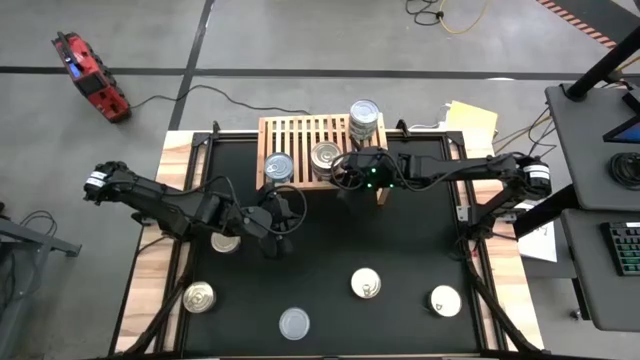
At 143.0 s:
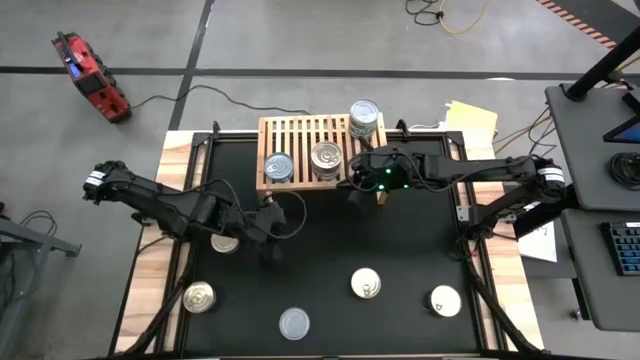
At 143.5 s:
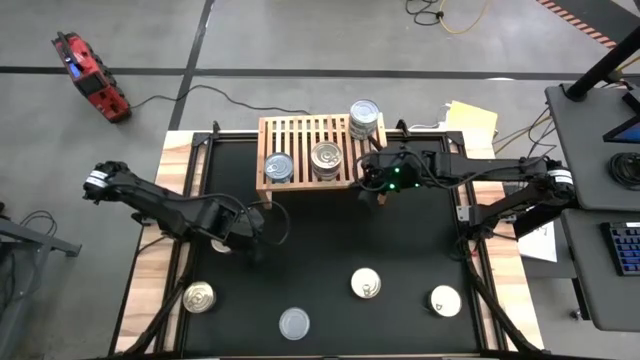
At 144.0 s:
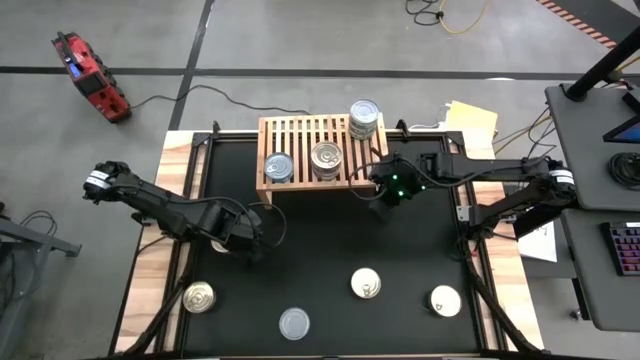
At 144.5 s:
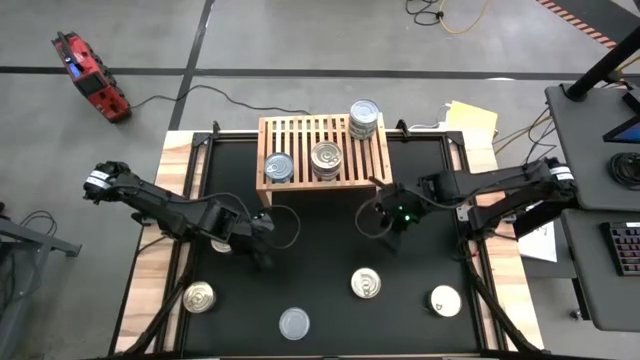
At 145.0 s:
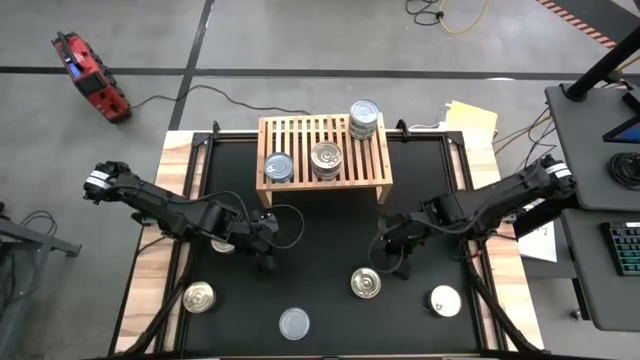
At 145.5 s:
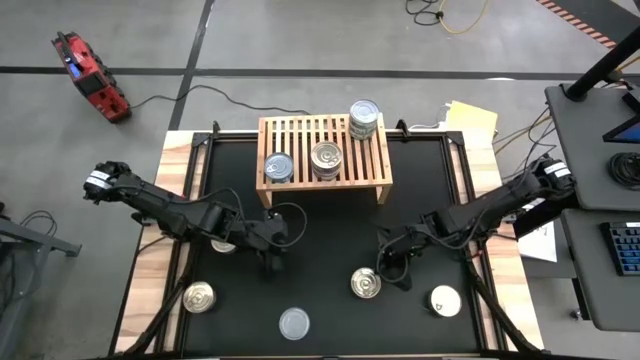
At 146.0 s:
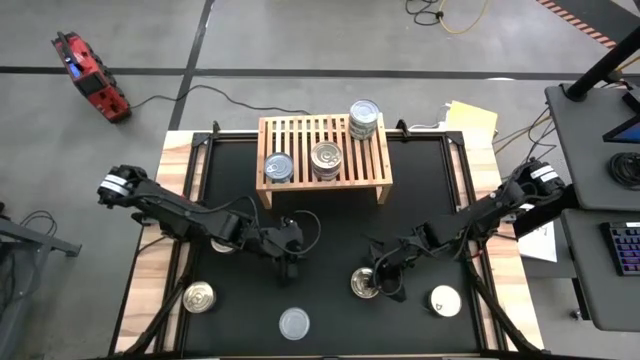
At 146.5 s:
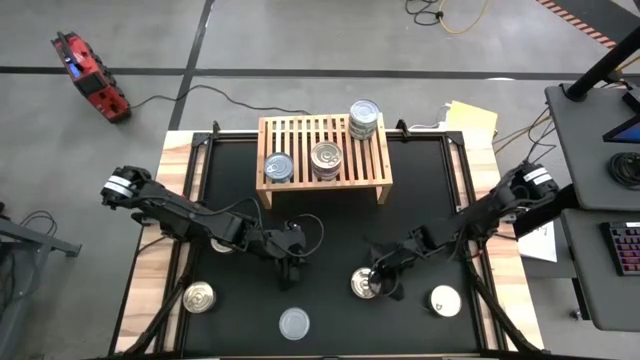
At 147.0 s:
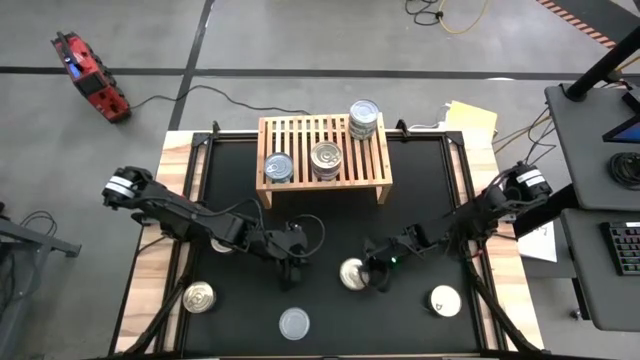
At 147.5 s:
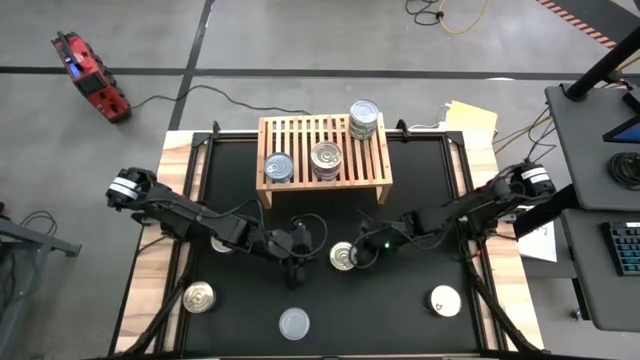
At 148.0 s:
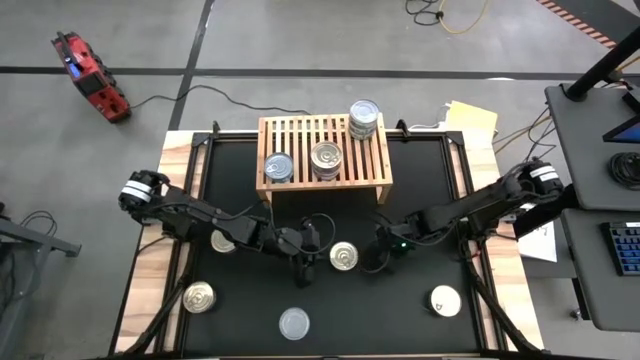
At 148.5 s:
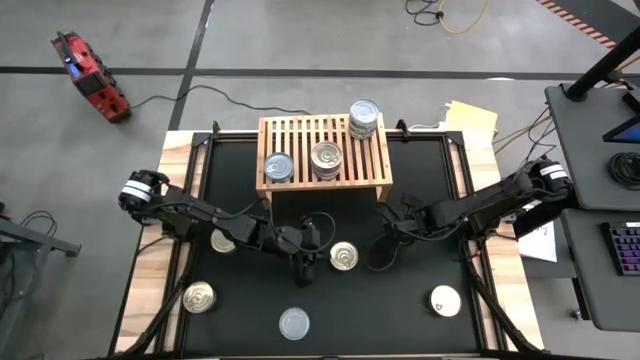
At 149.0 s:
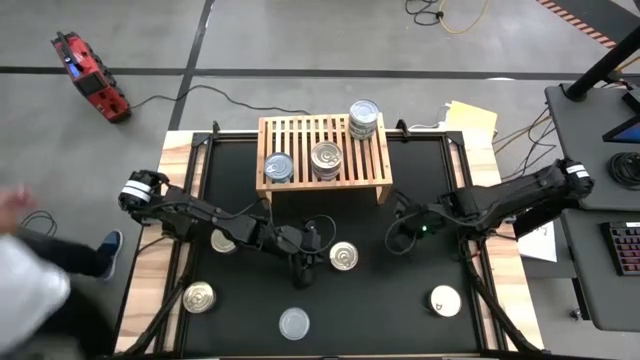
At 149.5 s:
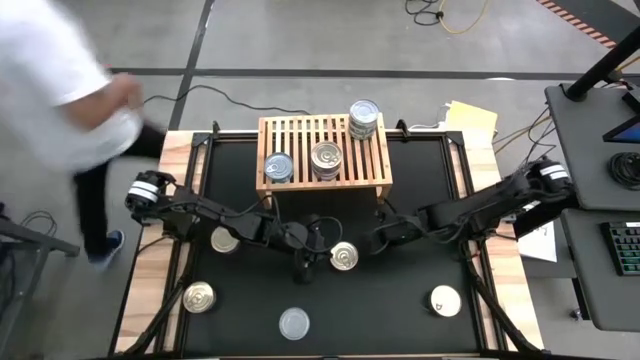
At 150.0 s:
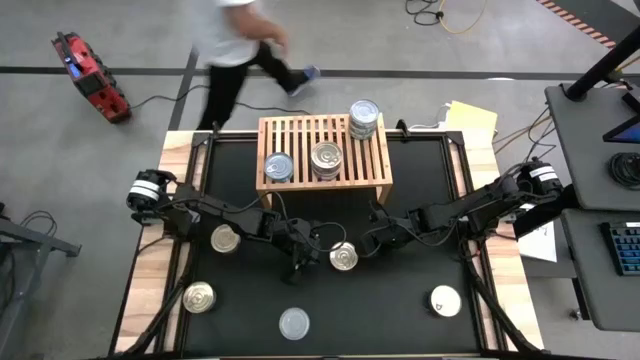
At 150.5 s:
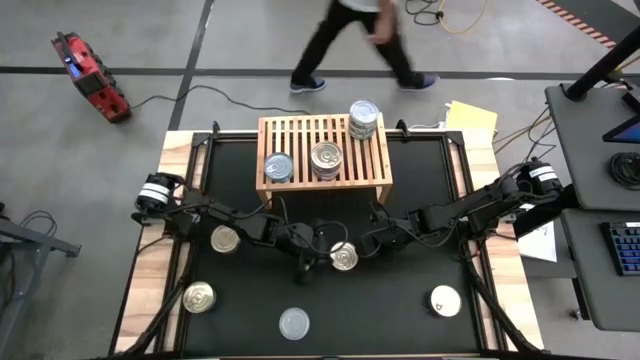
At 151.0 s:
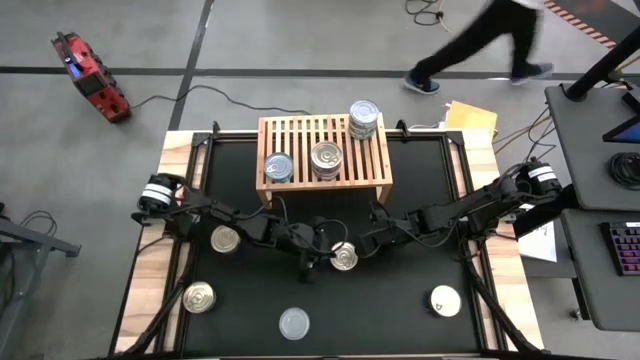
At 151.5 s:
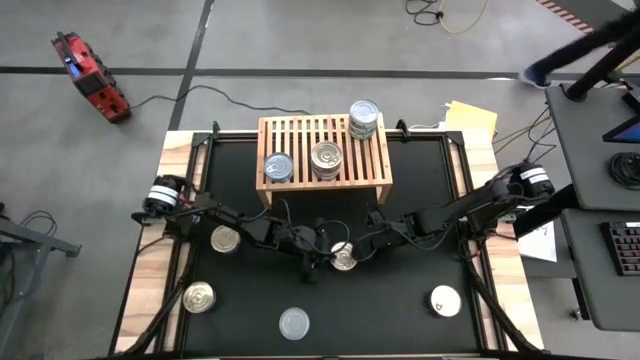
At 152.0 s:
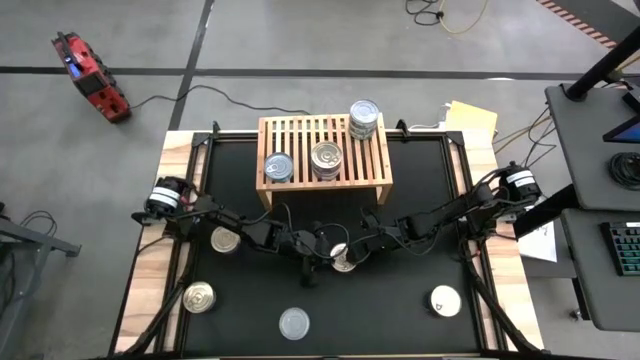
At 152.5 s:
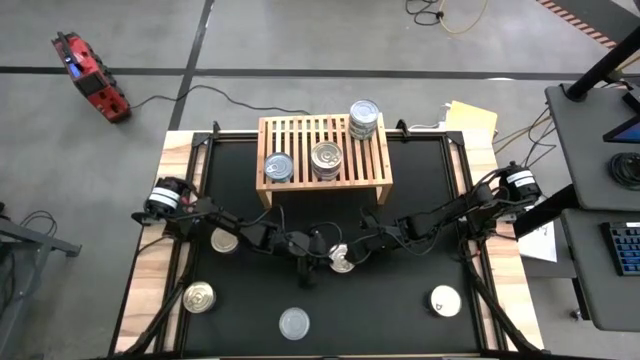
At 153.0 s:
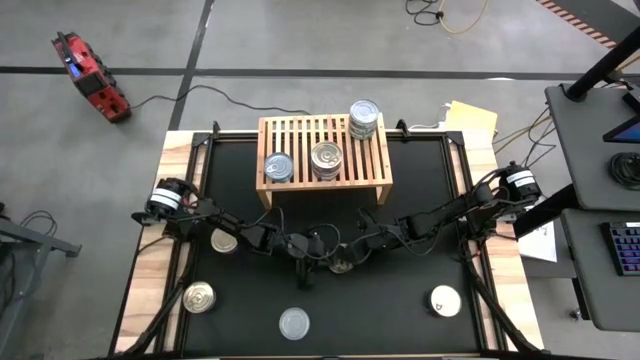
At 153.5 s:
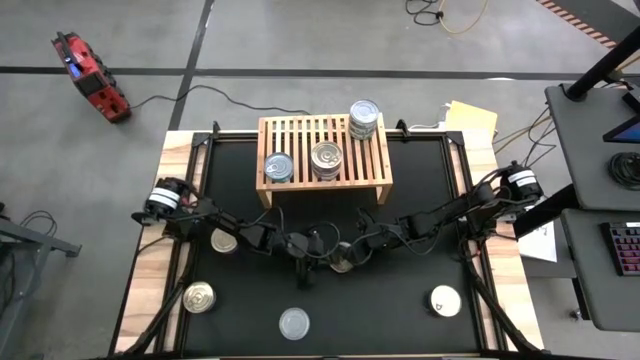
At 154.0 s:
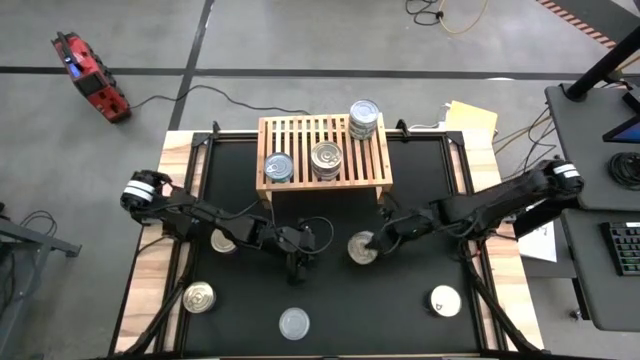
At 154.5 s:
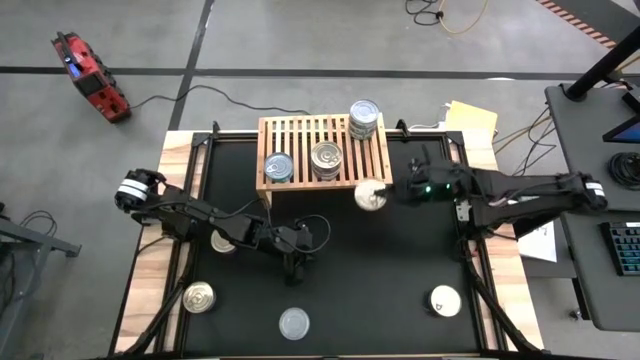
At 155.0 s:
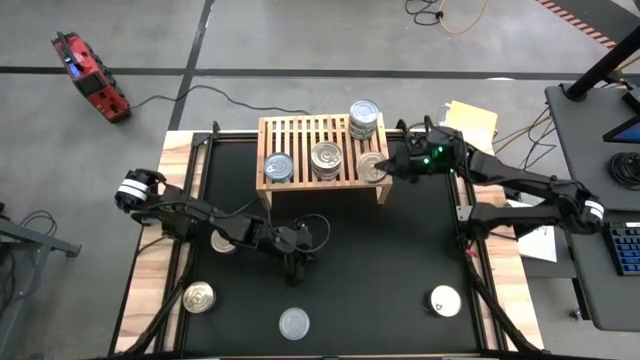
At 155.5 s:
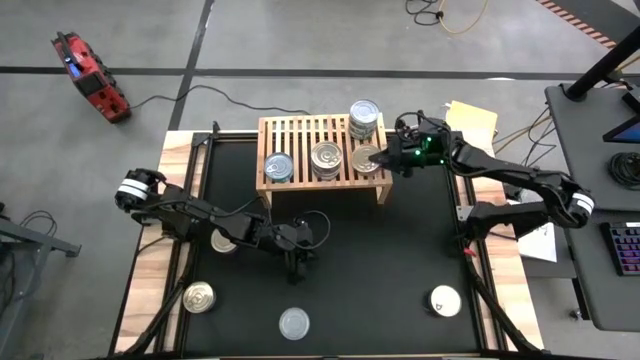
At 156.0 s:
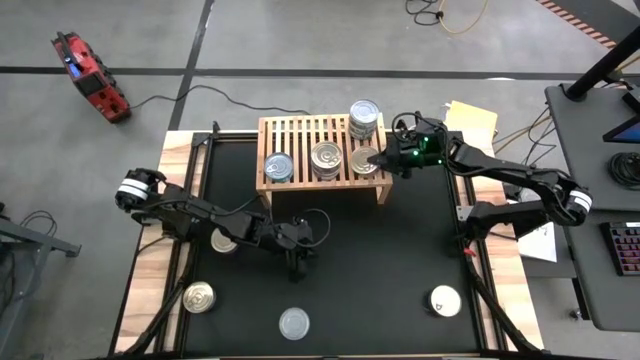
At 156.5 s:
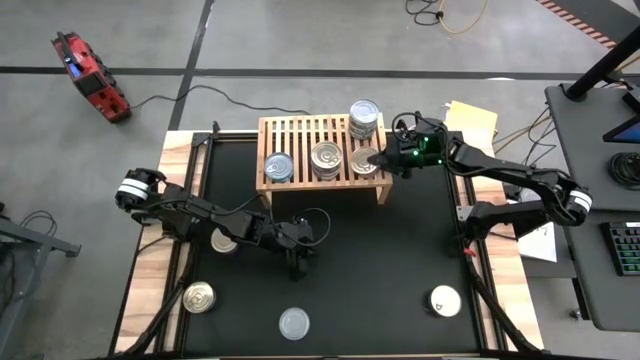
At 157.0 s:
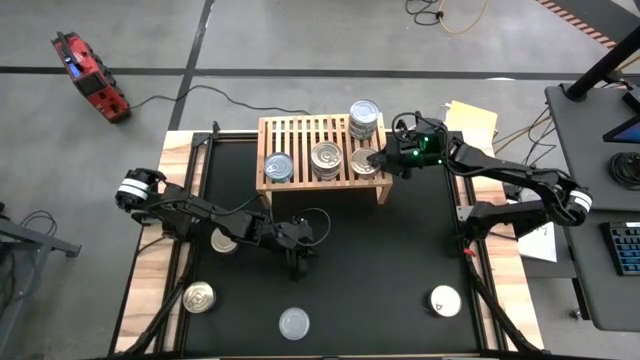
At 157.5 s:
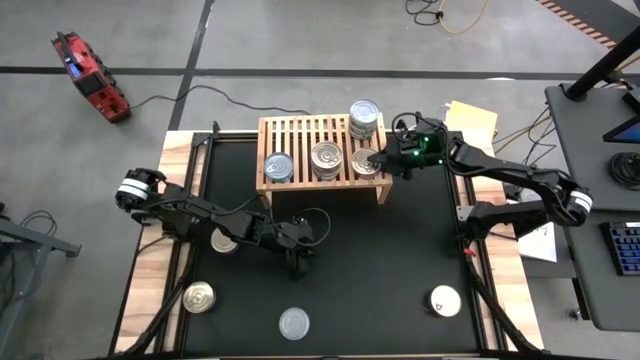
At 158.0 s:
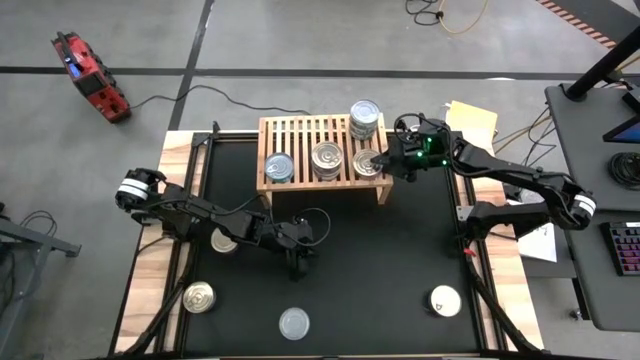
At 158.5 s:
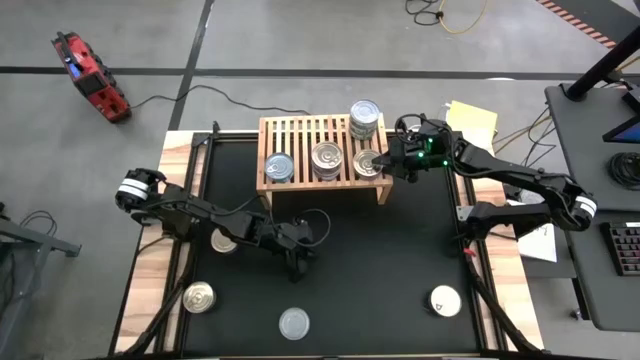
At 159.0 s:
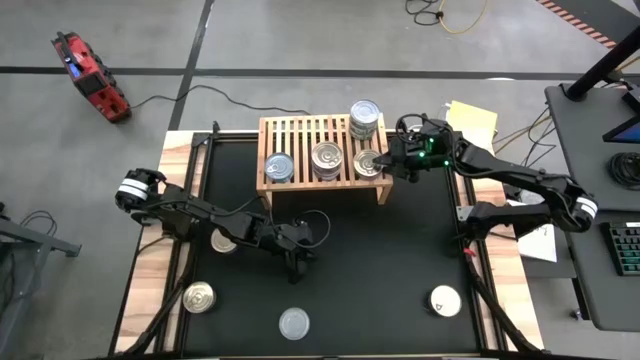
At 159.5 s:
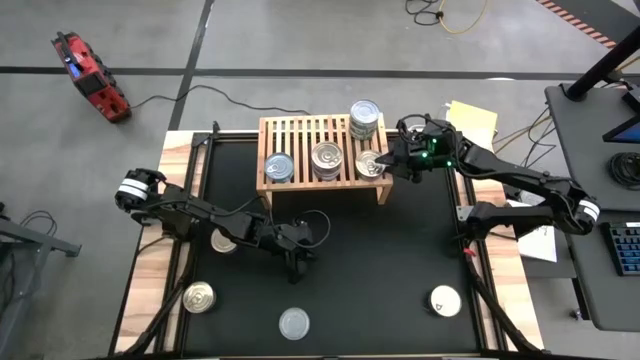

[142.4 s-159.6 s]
Task: Stack canned seafood by type on shelf
Put the blue pink tuna can on the shelf

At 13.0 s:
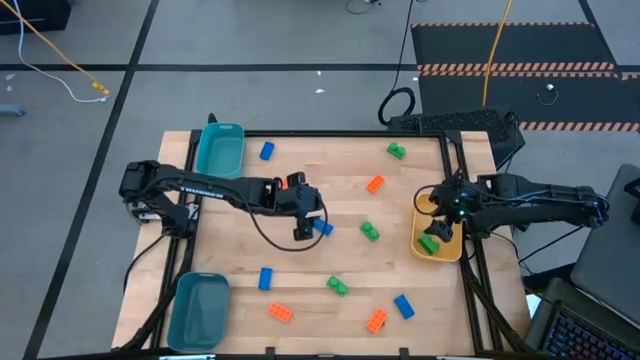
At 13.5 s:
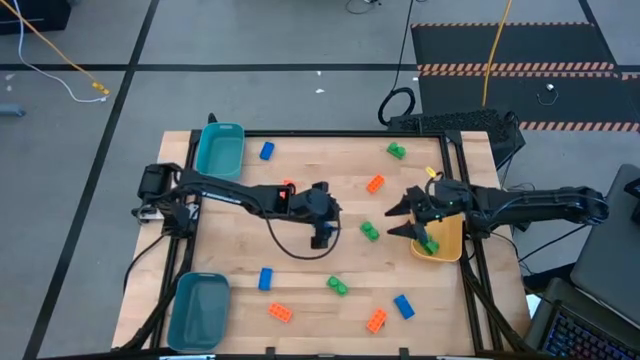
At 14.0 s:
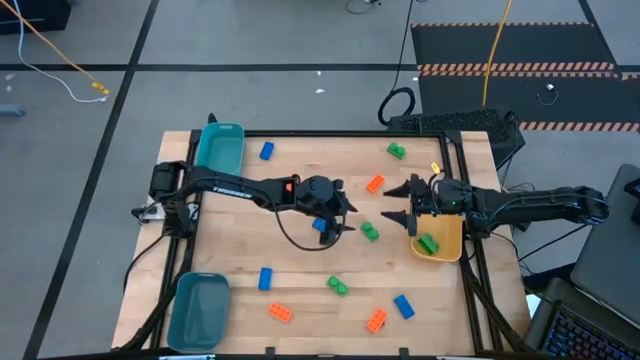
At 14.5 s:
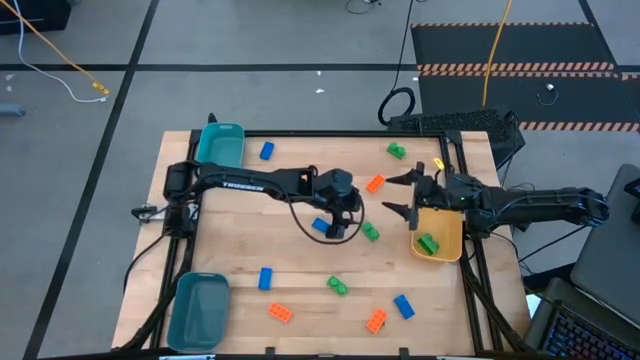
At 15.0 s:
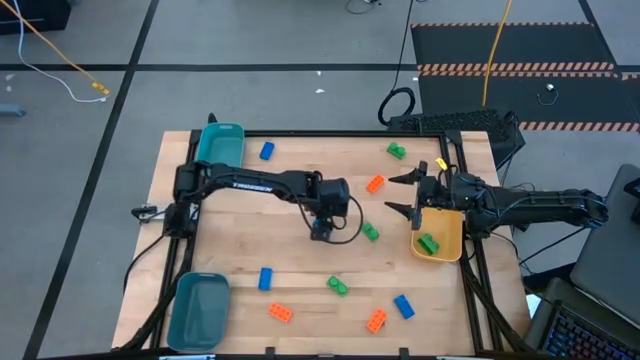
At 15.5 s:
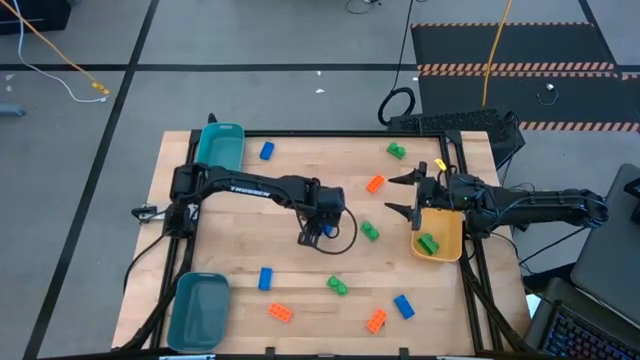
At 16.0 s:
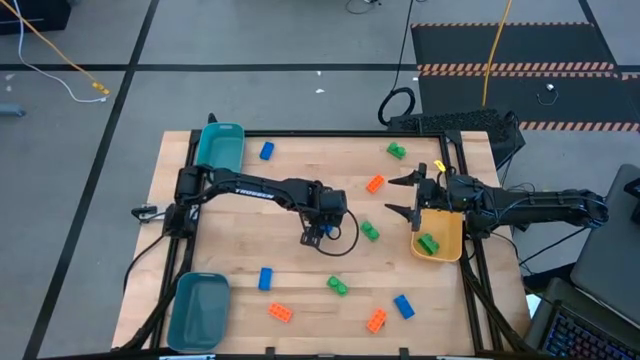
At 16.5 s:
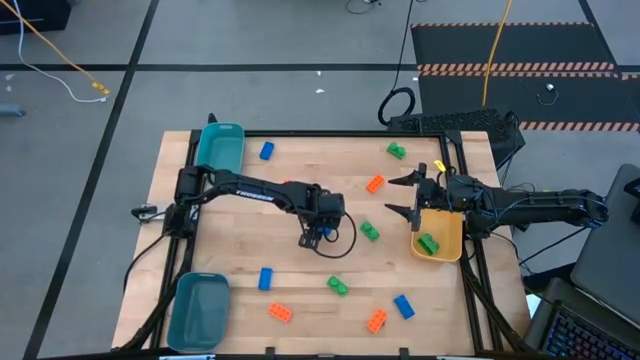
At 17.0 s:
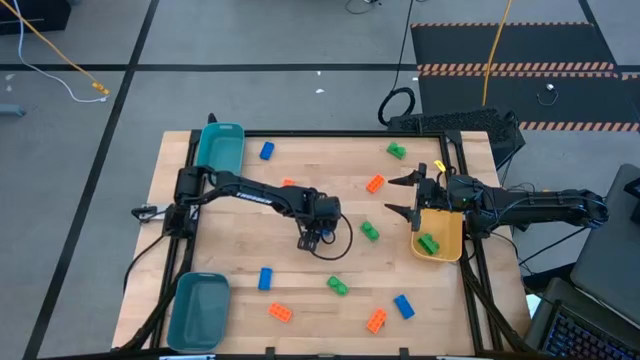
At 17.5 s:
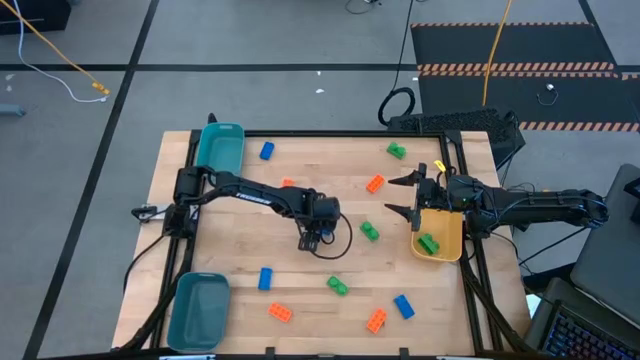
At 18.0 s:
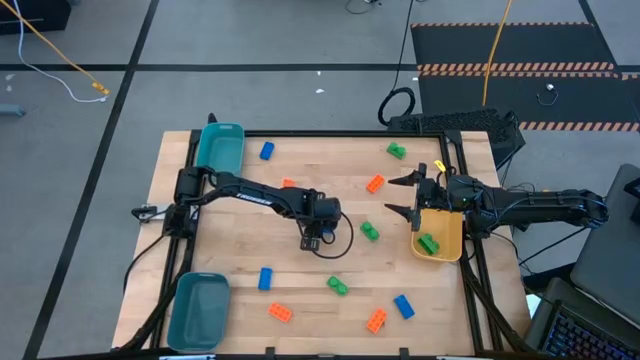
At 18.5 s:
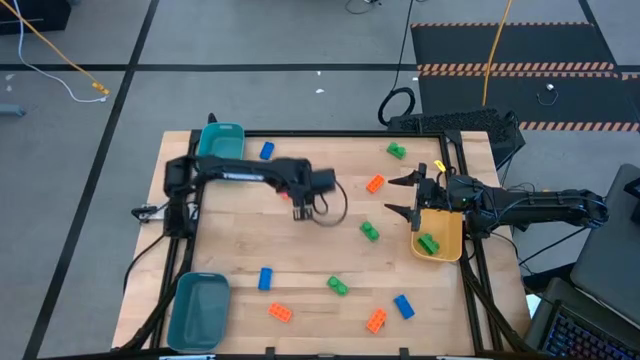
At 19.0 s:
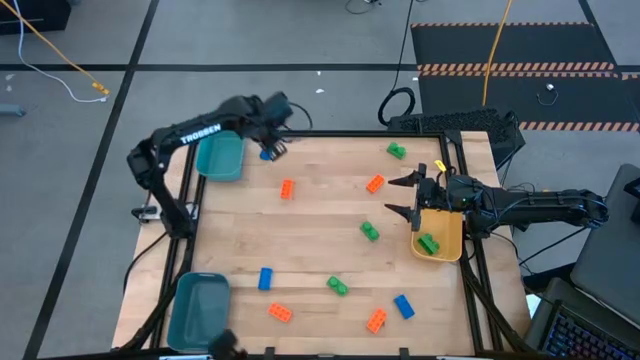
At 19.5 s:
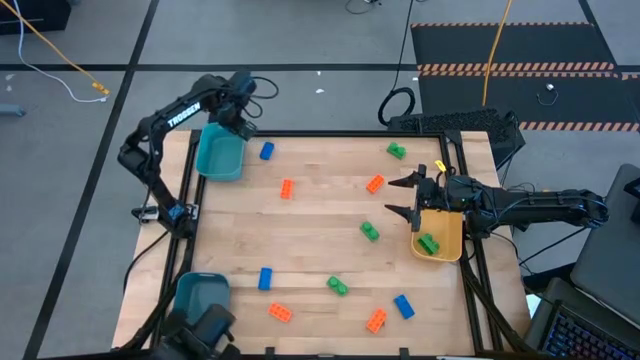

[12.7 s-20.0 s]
Task: Sort & place blocks by color
Put the blue game piece into the light blue bin
